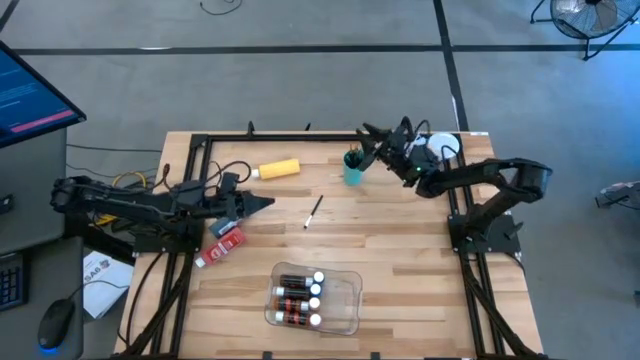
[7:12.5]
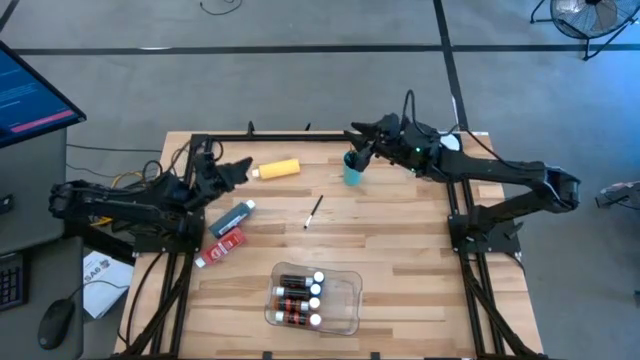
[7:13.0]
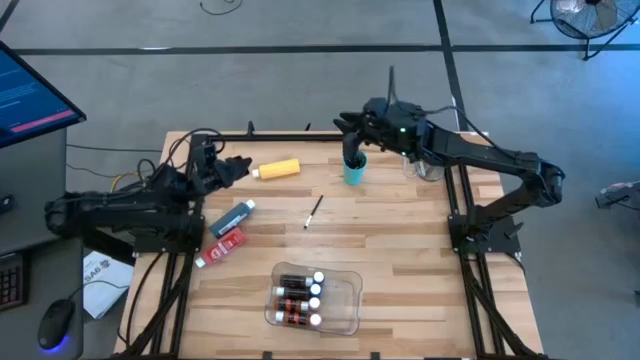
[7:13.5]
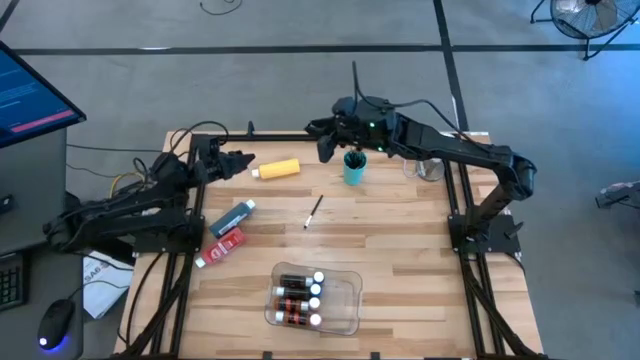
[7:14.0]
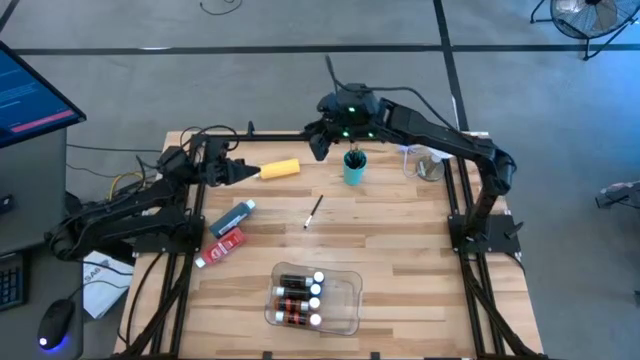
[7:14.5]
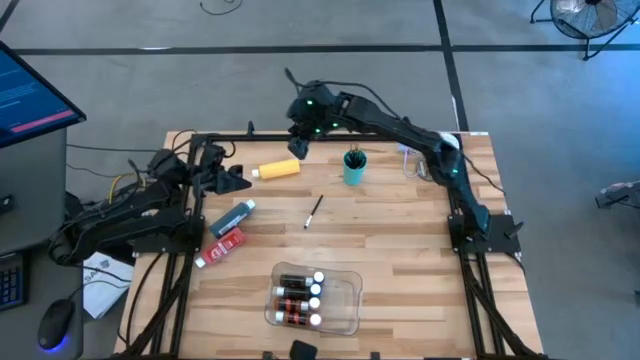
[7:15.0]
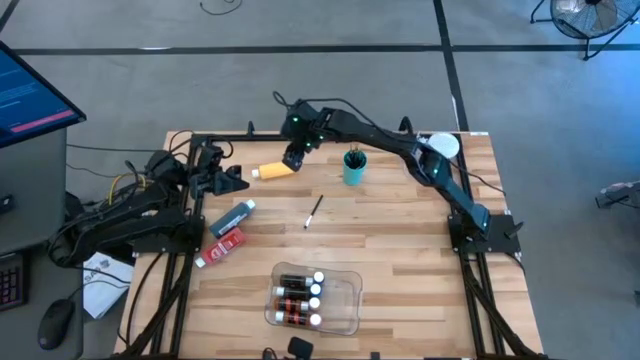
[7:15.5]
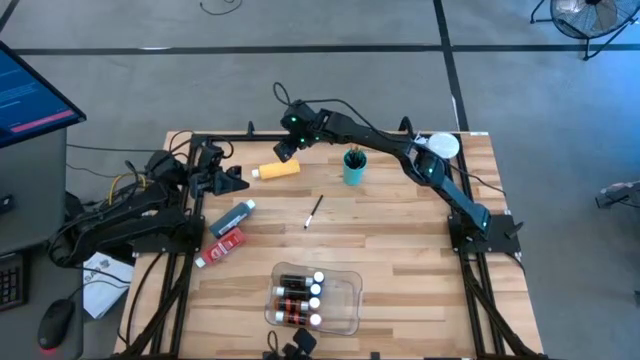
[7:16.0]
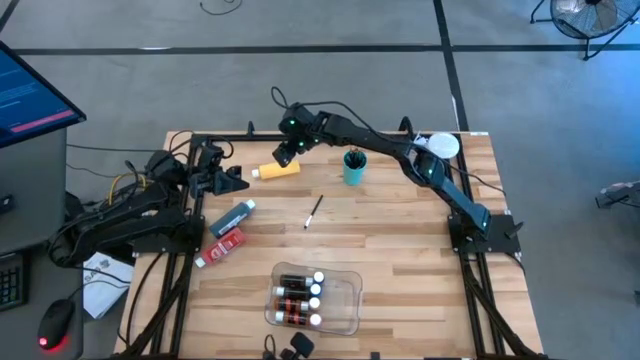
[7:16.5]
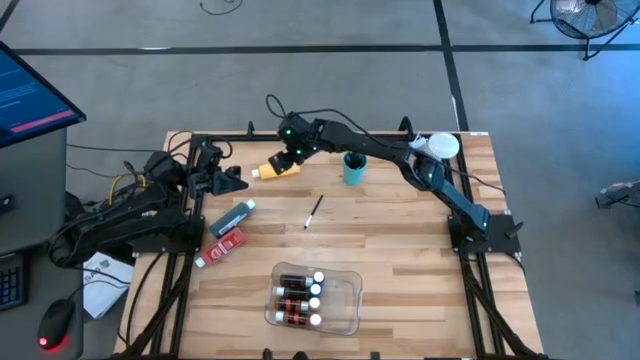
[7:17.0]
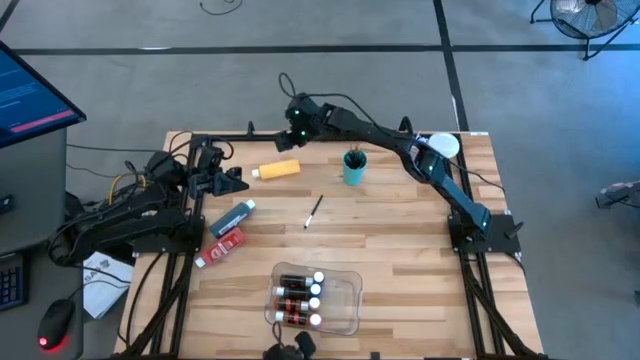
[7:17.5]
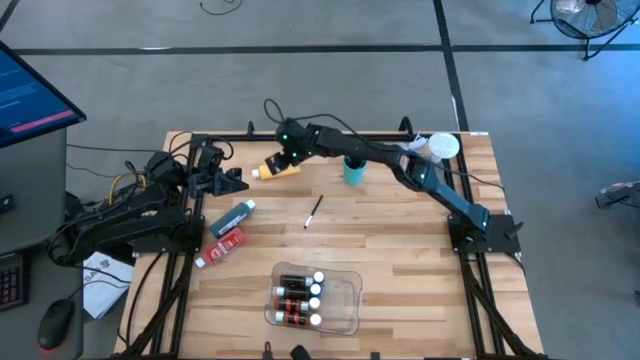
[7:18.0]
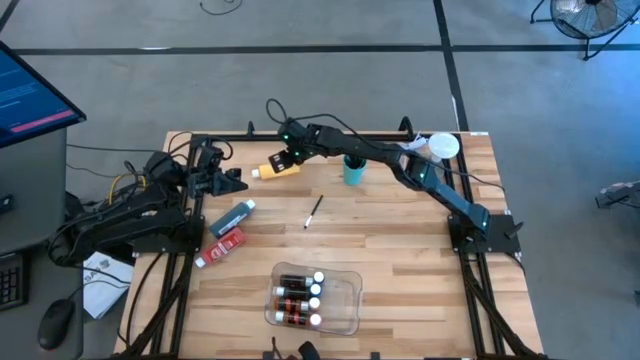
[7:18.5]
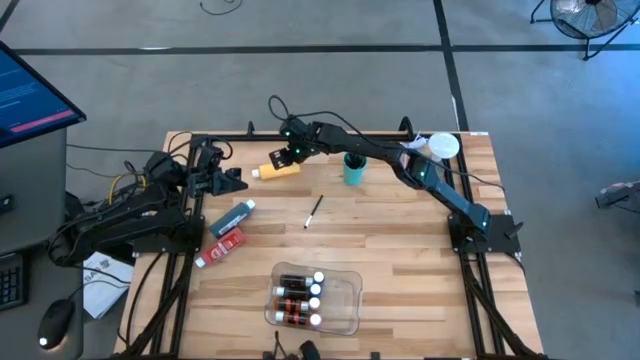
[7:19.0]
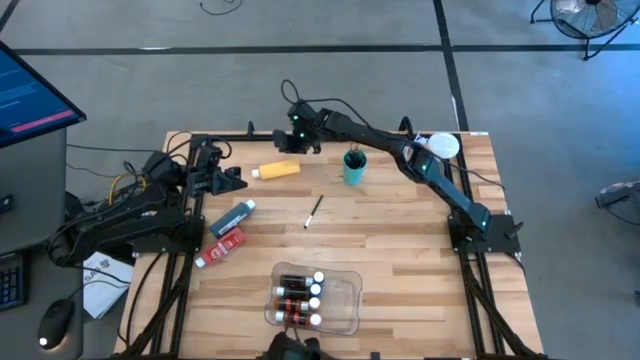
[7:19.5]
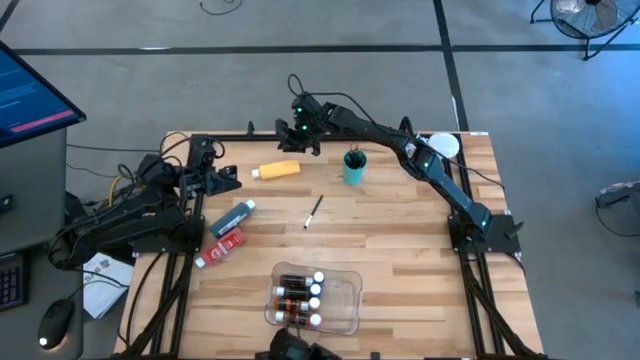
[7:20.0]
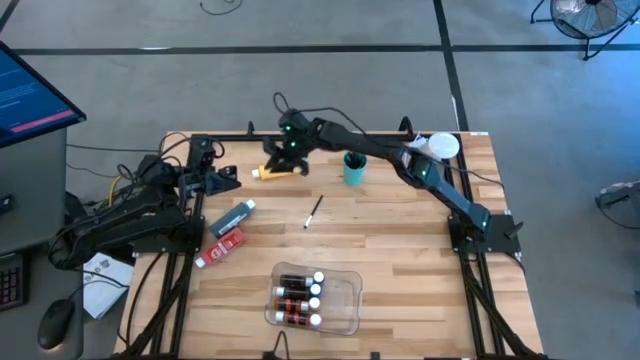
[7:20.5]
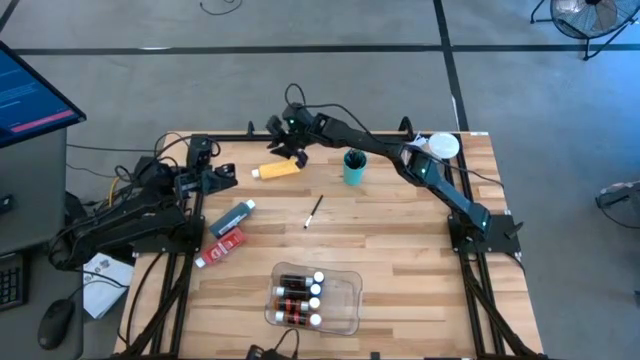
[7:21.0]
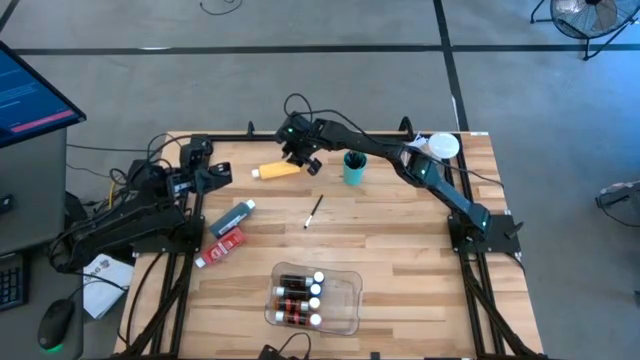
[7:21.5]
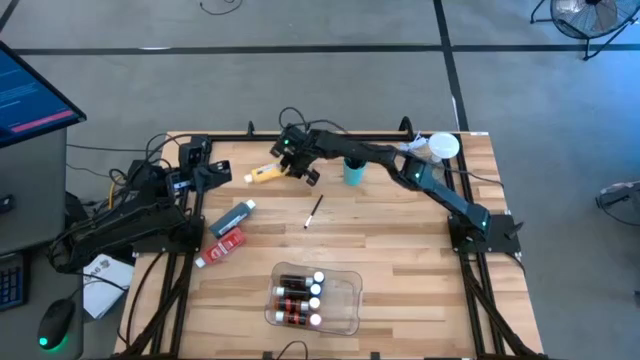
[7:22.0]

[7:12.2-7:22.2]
Task: Pick & Place Paint Supplies
Put the yellow paint bottle into the transparent bin

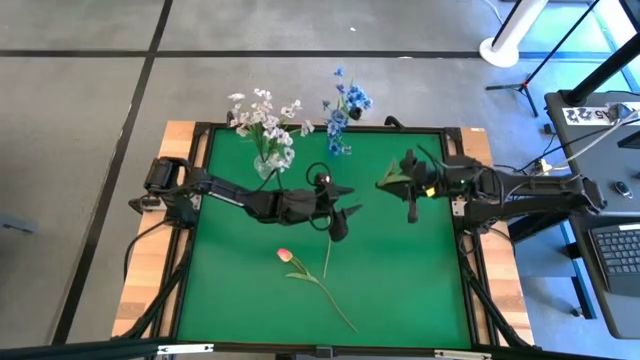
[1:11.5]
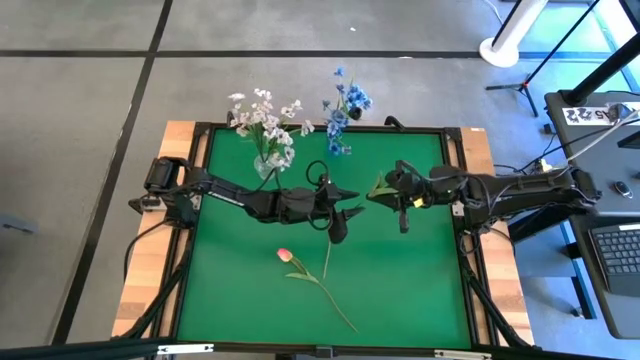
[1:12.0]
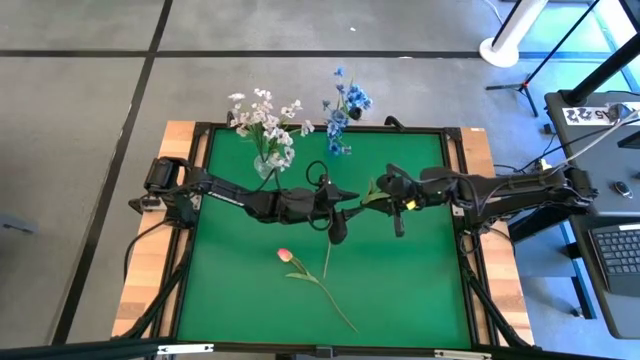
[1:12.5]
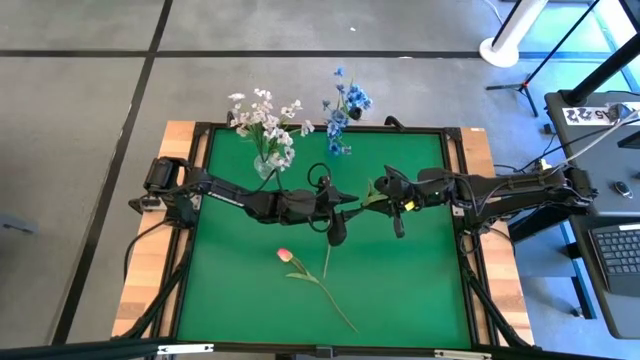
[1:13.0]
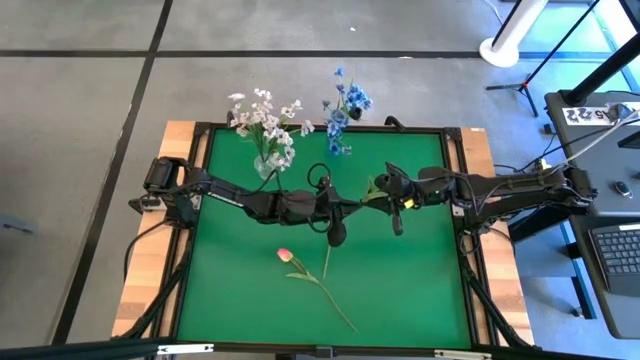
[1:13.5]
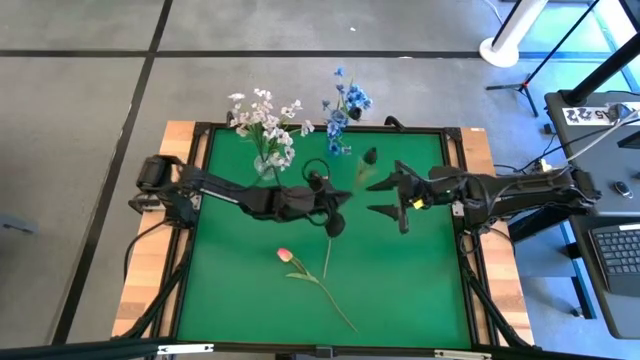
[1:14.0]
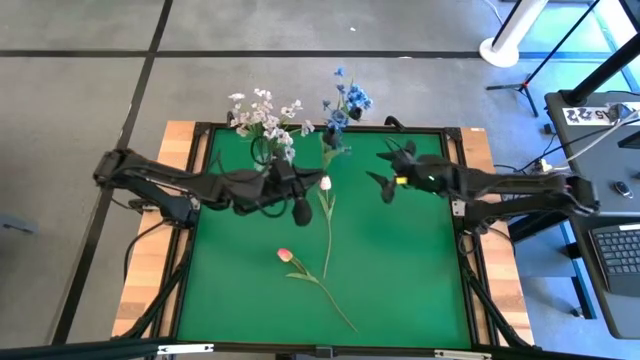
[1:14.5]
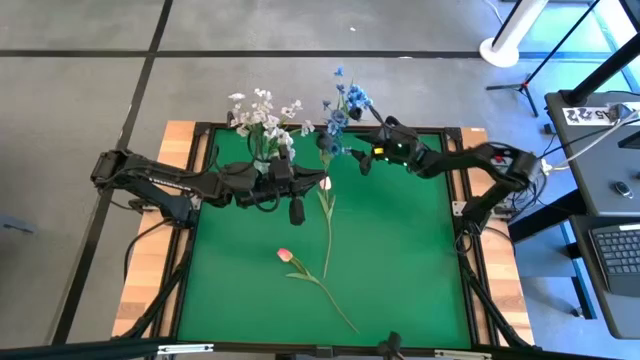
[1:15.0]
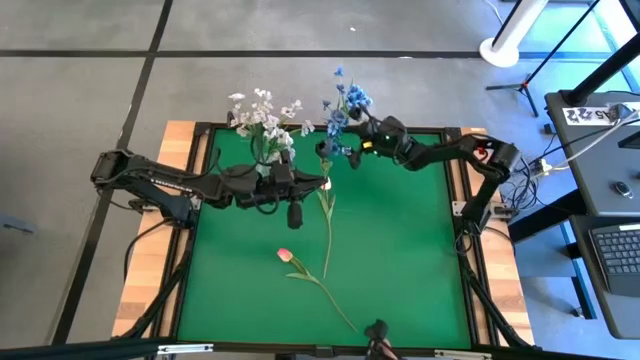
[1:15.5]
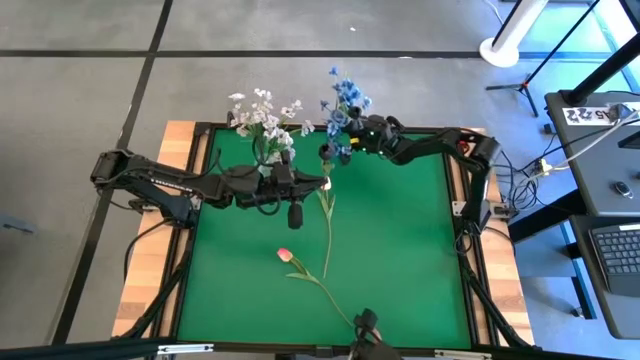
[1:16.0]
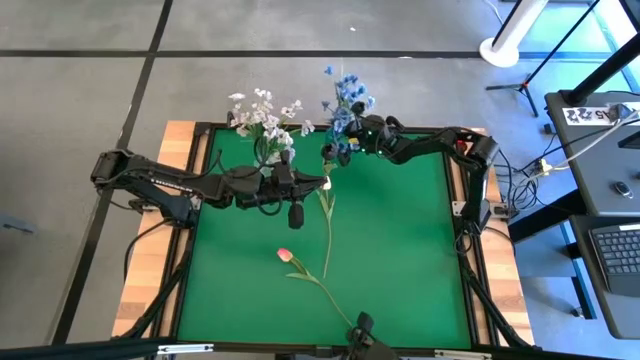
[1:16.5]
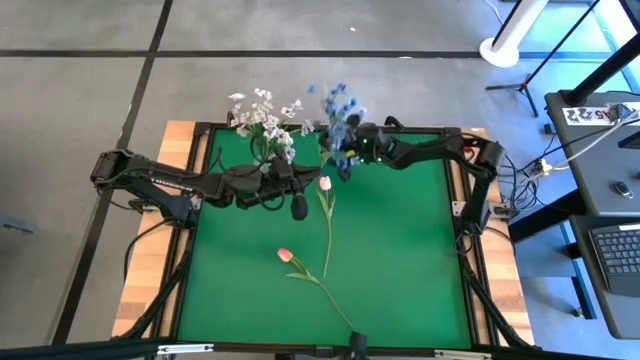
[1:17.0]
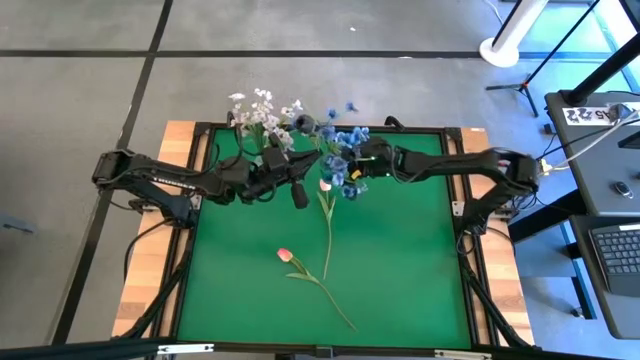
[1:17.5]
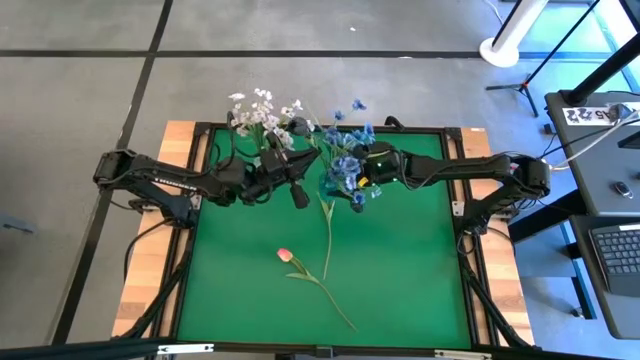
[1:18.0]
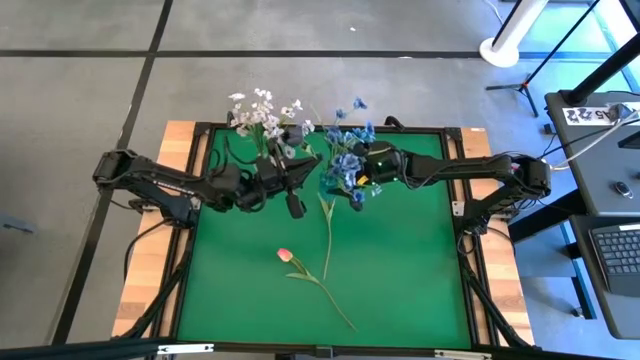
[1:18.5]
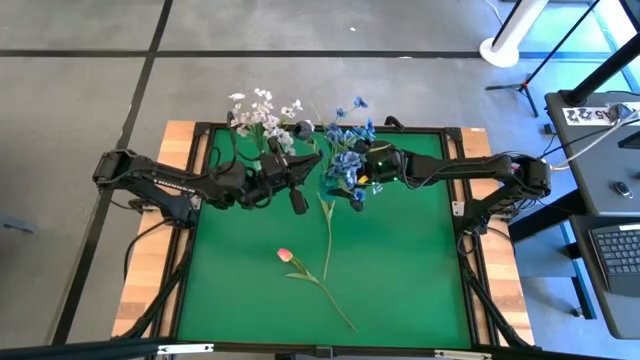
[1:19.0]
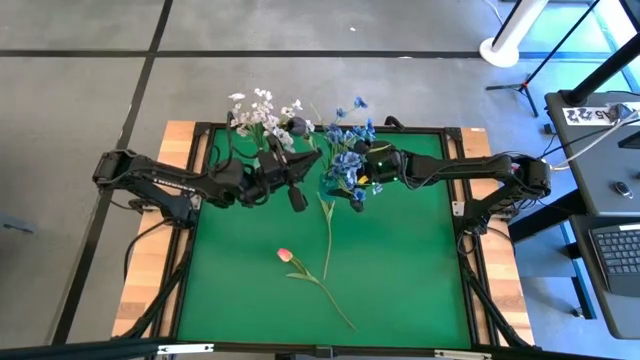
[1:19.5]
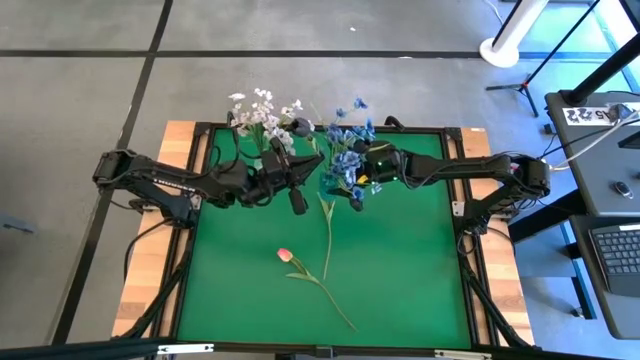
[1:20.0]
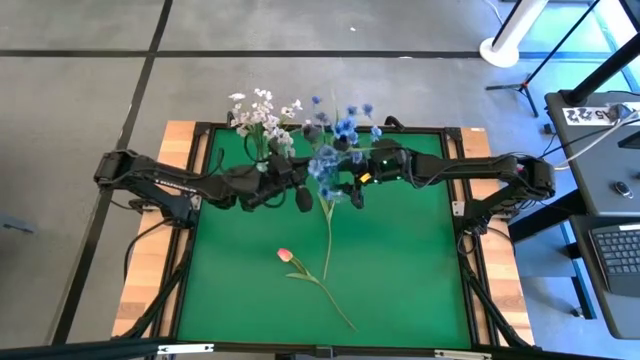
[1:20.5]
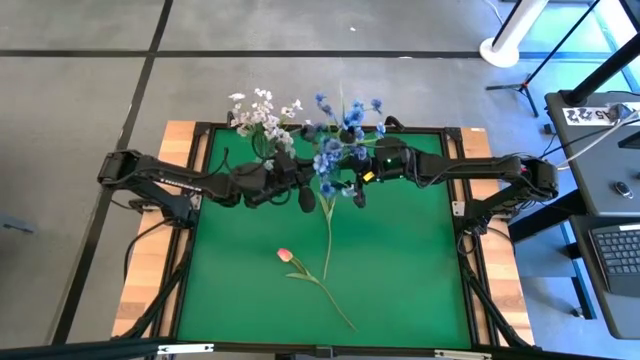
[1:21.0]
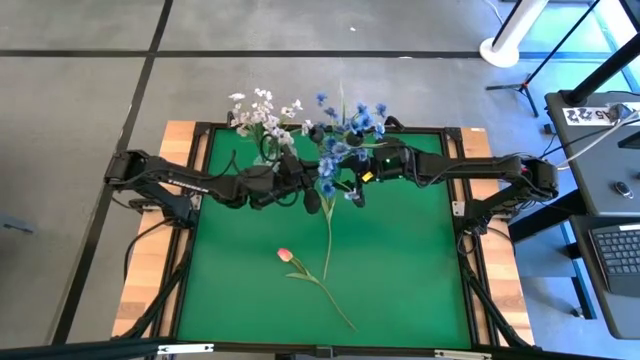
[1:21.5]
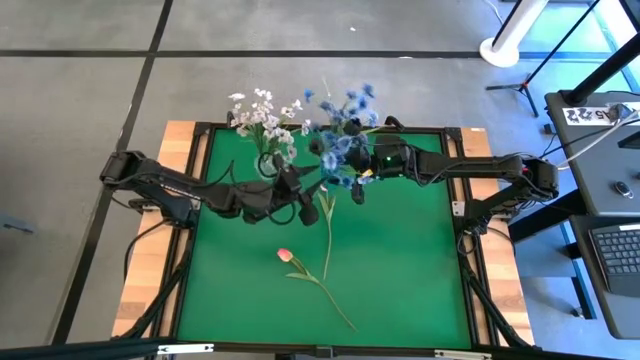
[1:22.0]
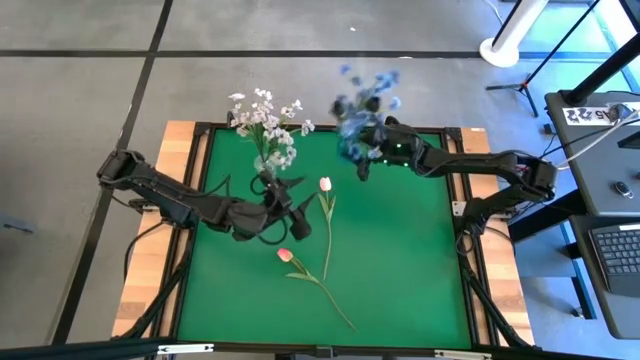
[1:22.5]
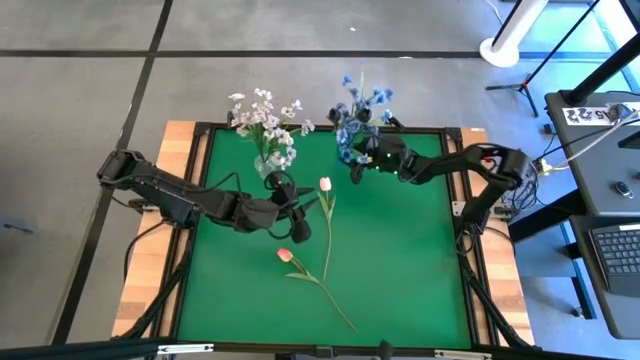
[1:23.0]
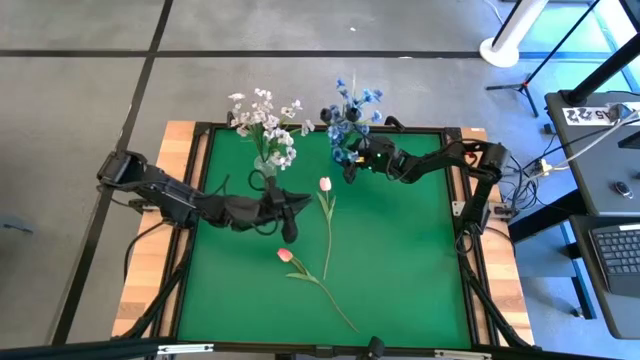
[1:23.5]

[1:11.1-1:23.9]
Task: Sort flowers into vase by color
Put the black flower into the blue vase
